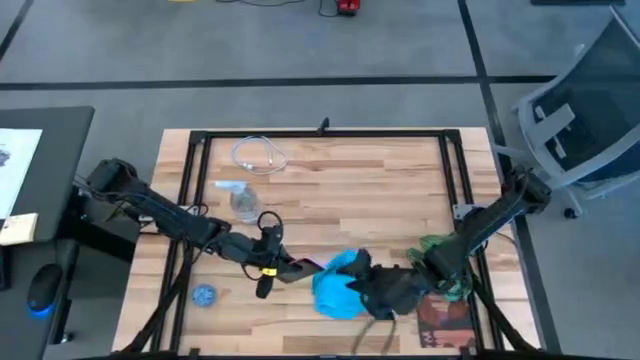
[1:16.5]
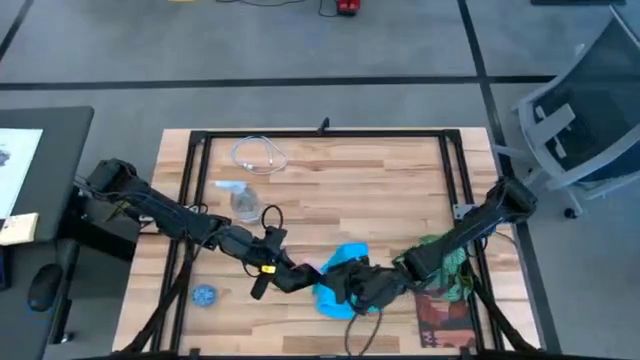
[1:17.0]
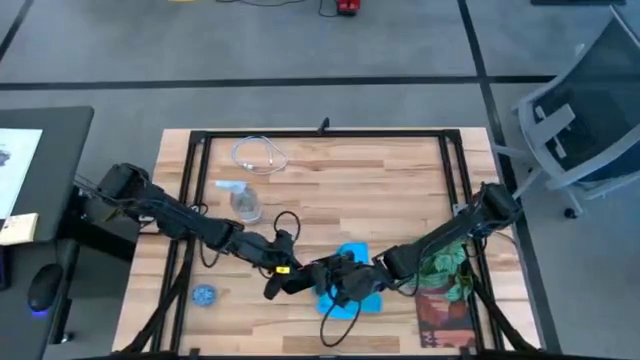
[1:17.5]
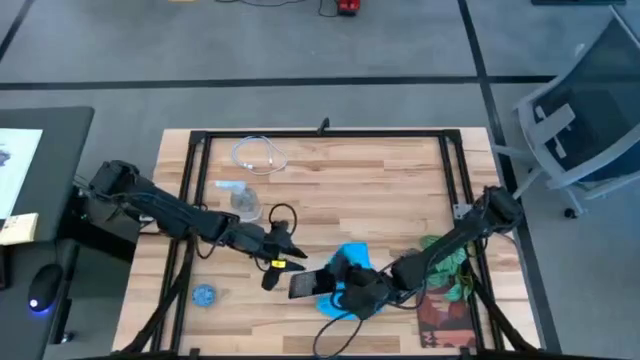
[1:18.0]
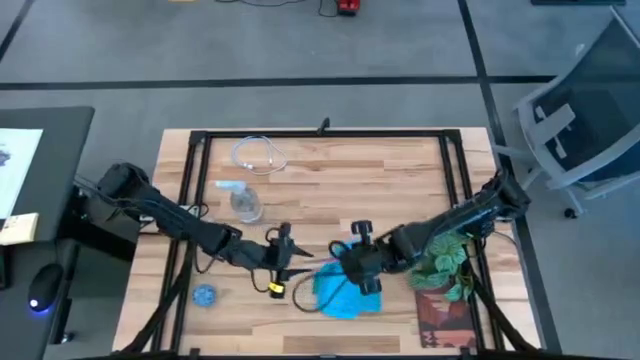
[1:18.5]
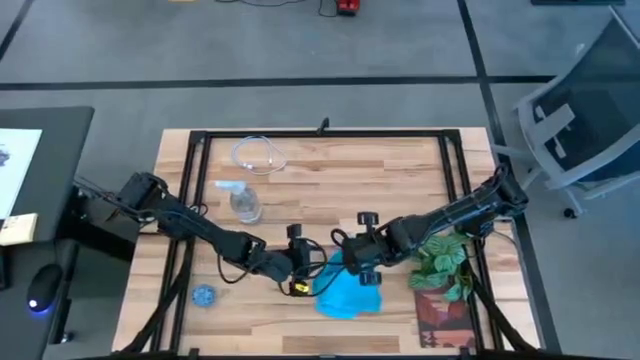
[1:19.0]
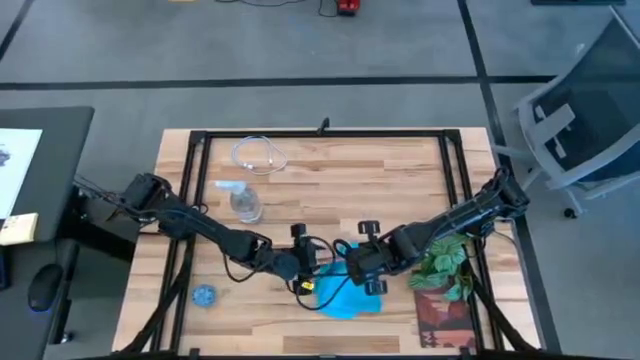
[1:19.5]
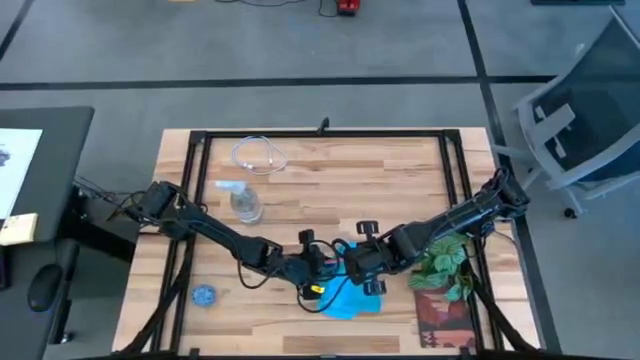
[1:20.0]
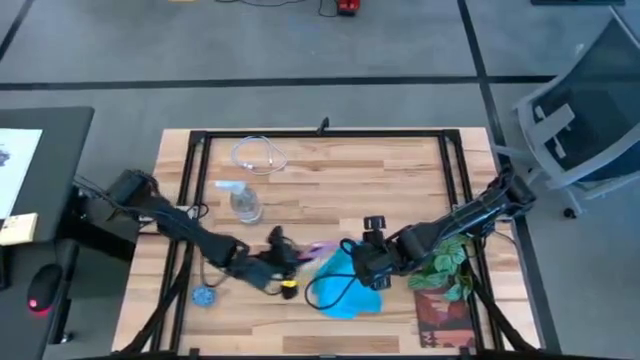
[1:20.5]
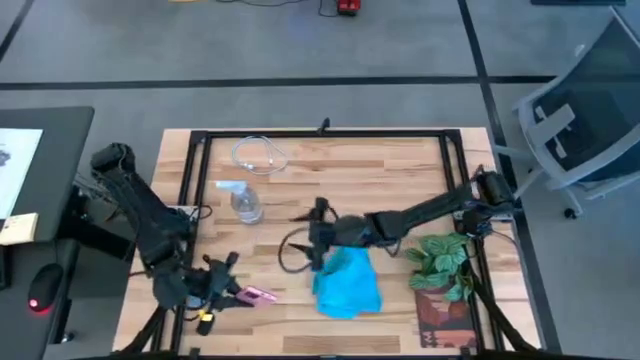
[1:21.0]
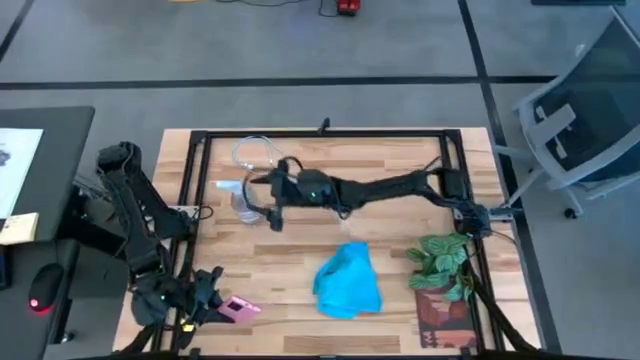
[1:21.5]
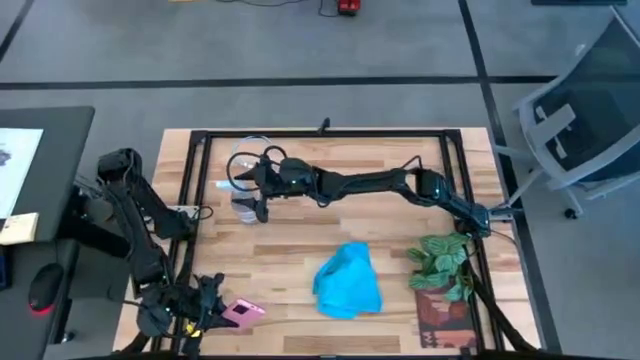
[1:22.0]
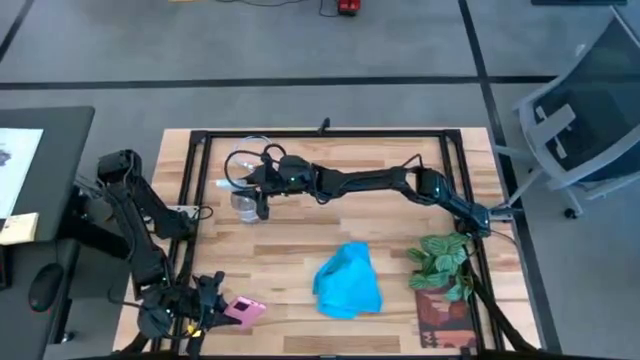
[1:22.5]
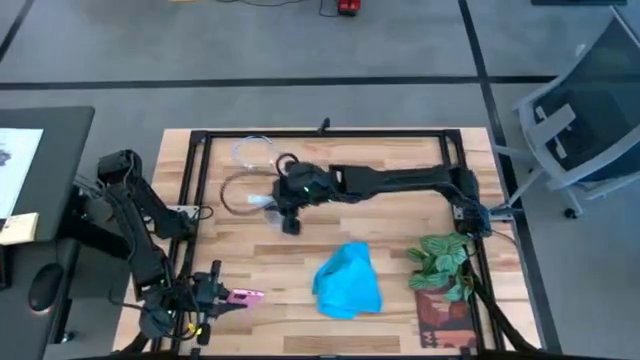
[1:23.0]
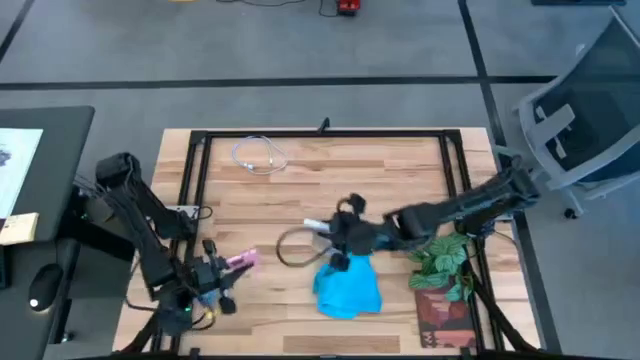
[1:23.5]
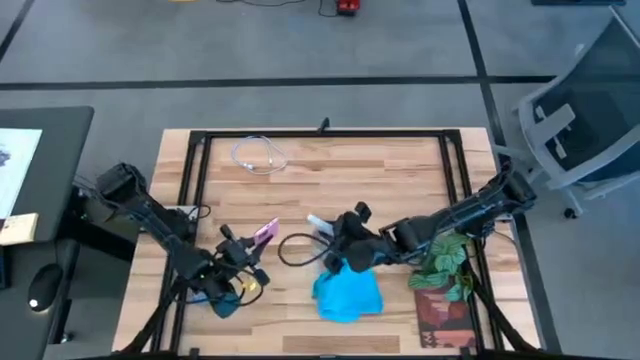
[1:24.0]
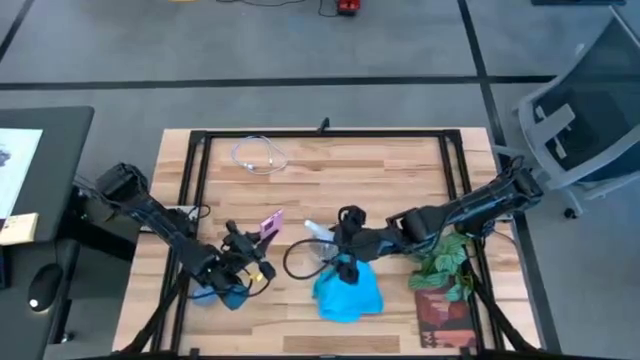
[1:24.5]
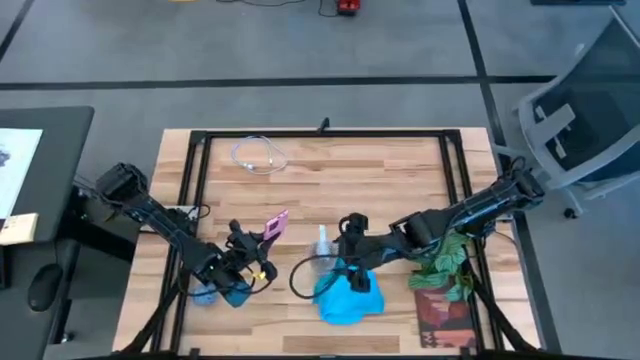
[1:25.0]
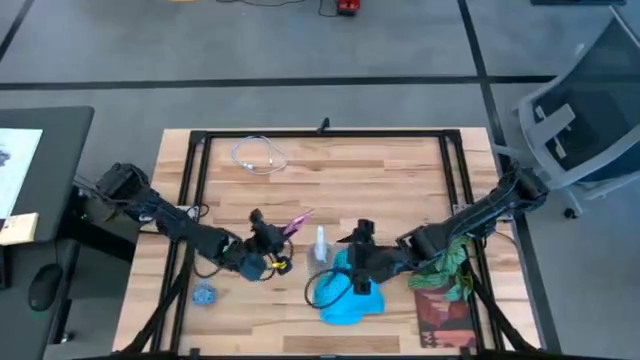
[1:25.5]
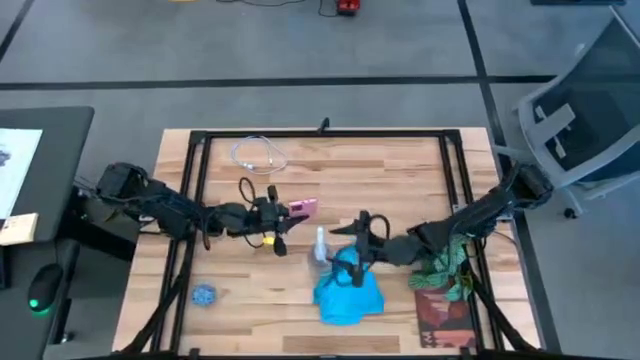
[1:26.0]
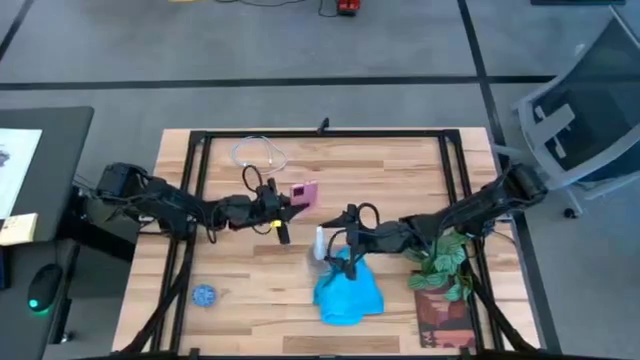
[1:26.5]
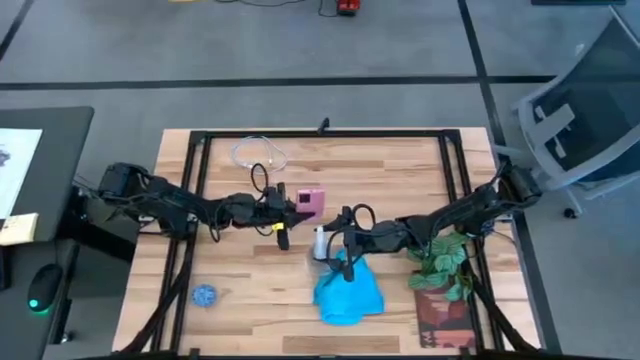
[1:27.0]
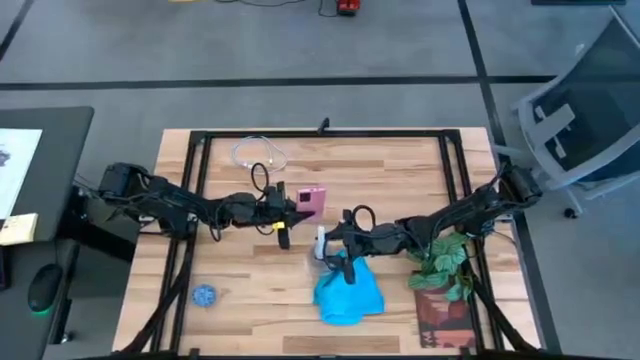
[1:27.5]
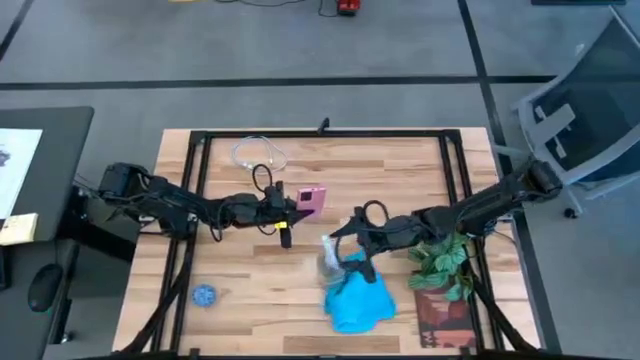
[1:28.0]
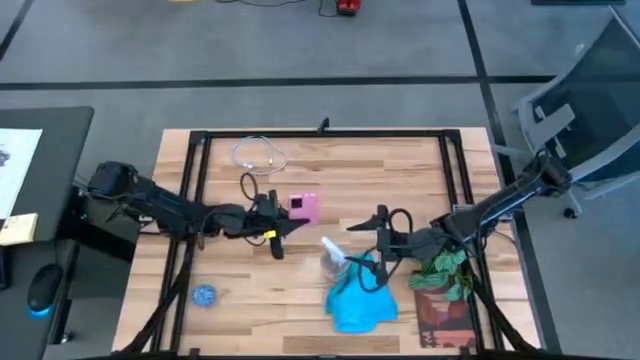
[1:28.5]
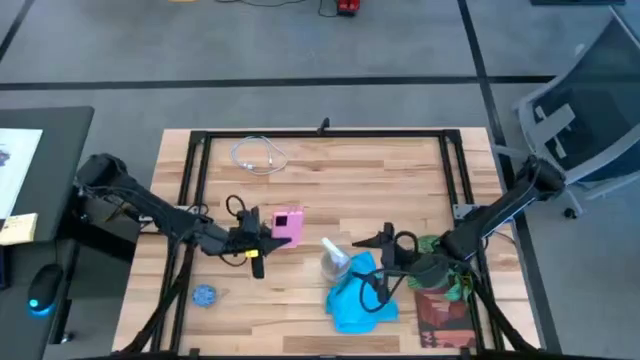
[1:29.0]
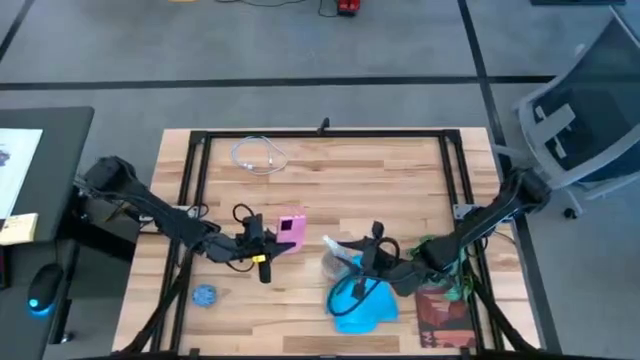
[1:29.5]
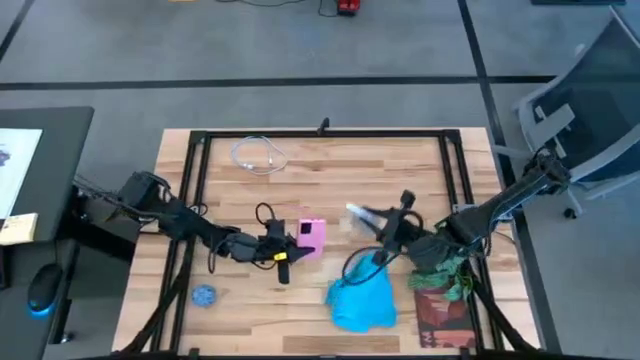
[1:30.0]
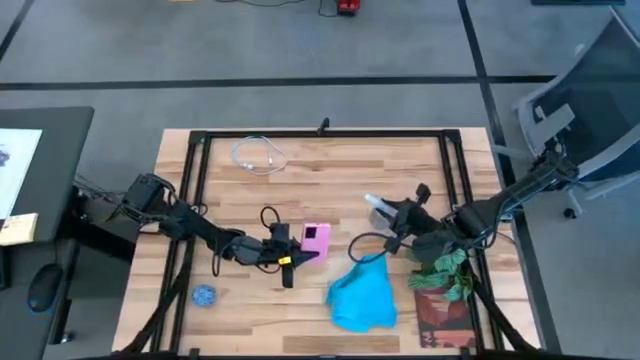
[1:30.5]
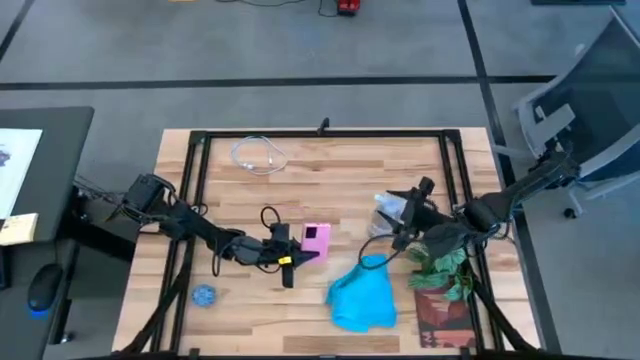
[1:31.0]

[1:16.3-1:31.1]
Task: Apply microfiber cloth
Spray the back of the cellphone using the spray bottle

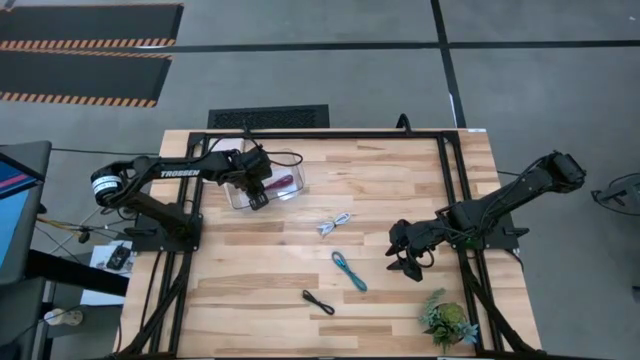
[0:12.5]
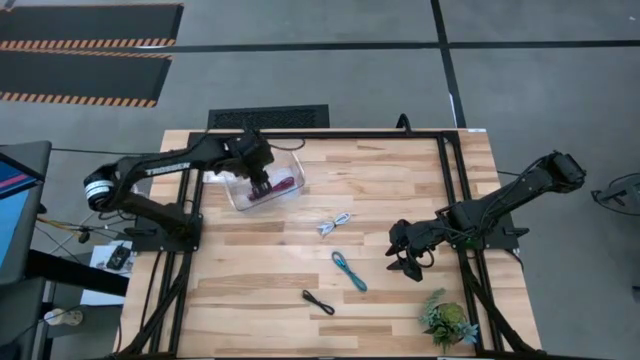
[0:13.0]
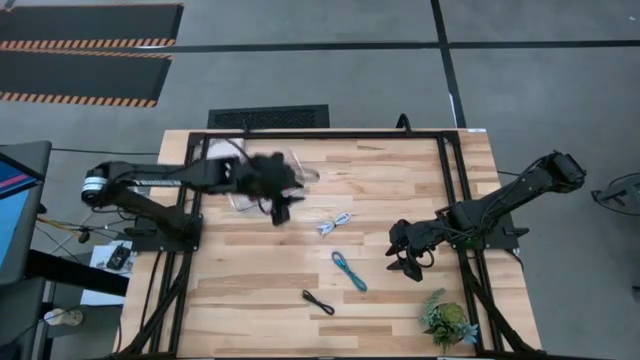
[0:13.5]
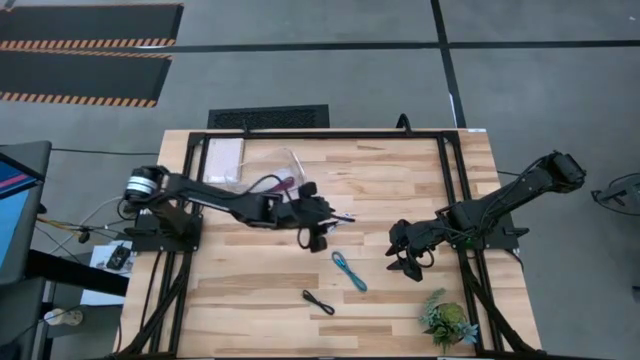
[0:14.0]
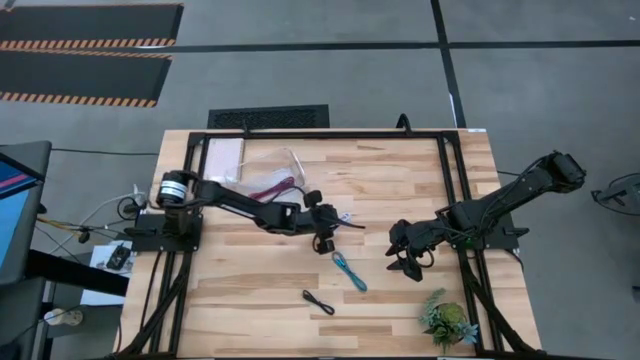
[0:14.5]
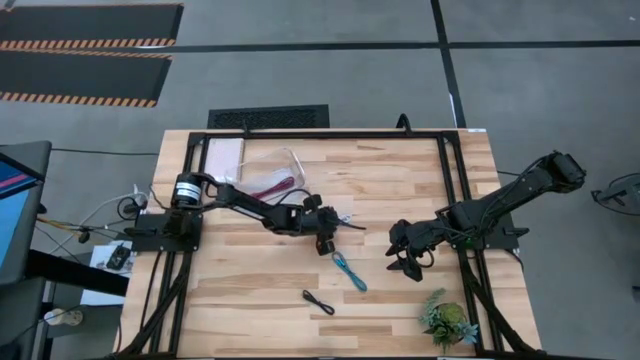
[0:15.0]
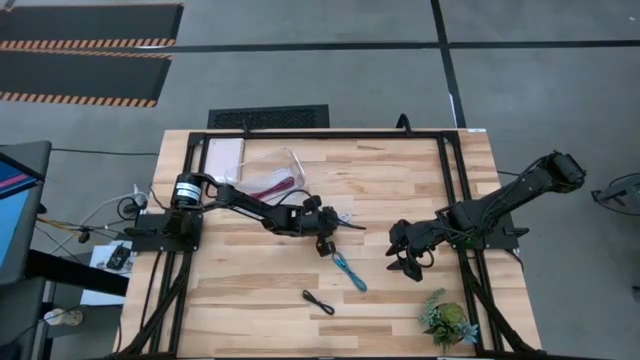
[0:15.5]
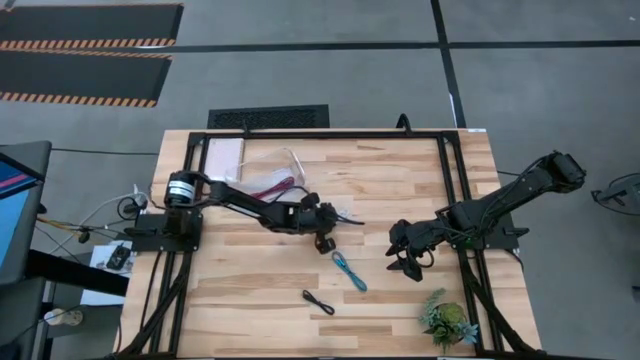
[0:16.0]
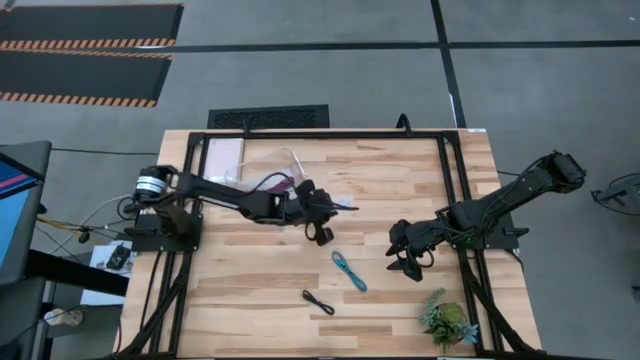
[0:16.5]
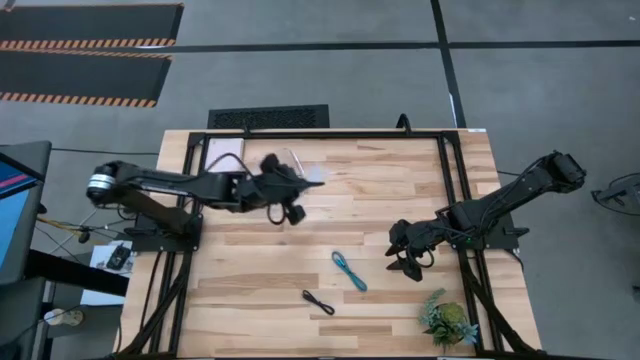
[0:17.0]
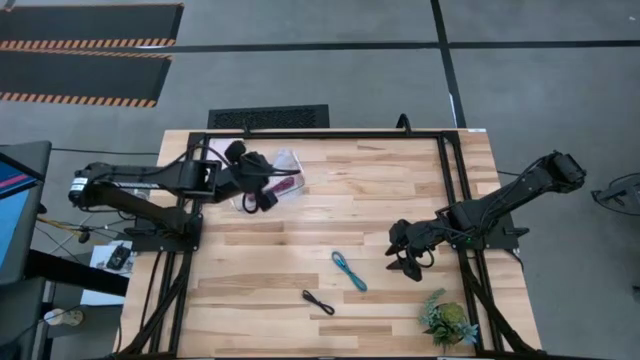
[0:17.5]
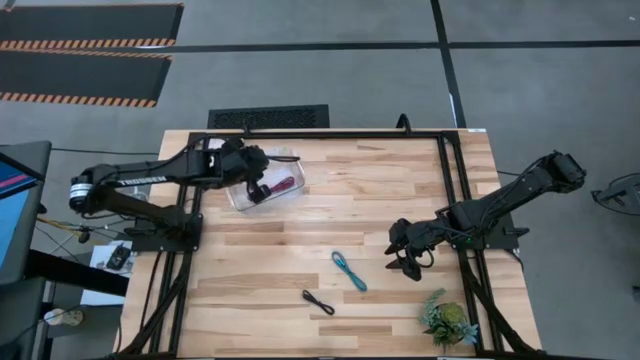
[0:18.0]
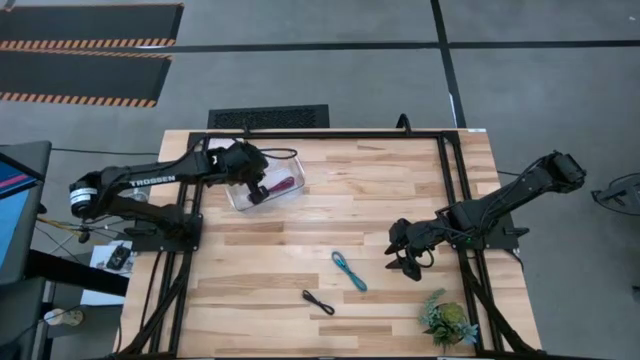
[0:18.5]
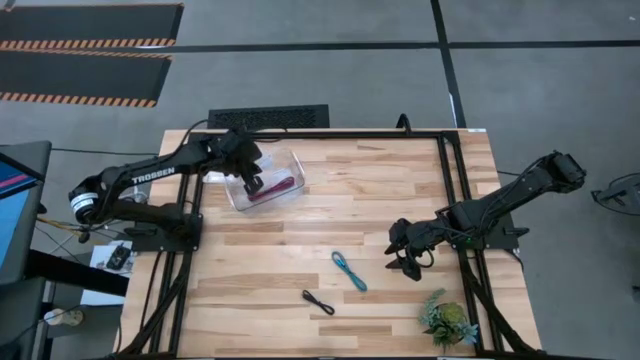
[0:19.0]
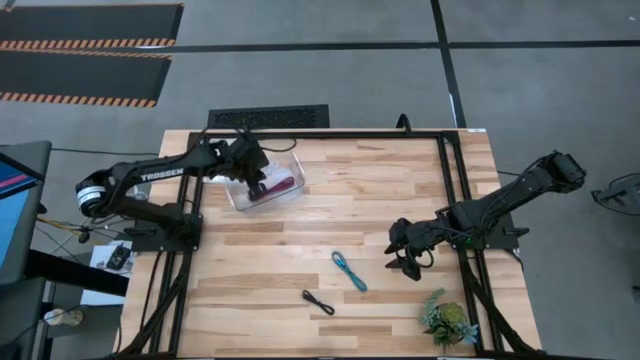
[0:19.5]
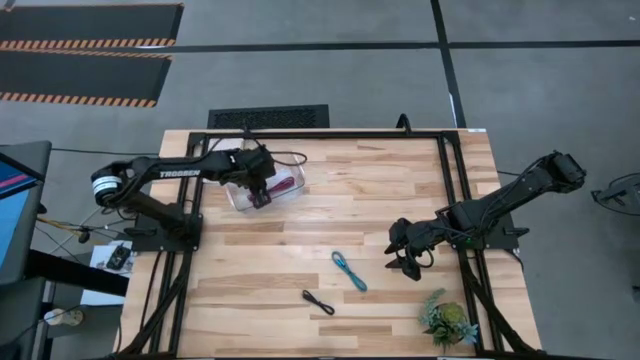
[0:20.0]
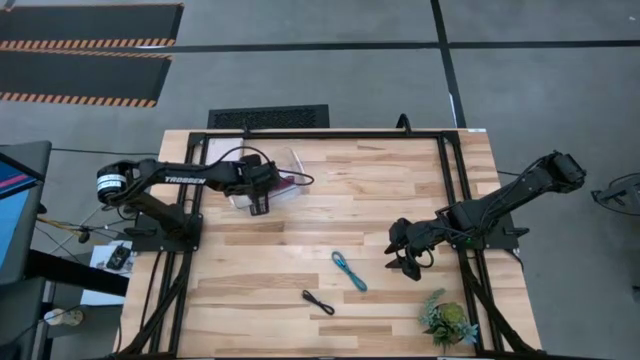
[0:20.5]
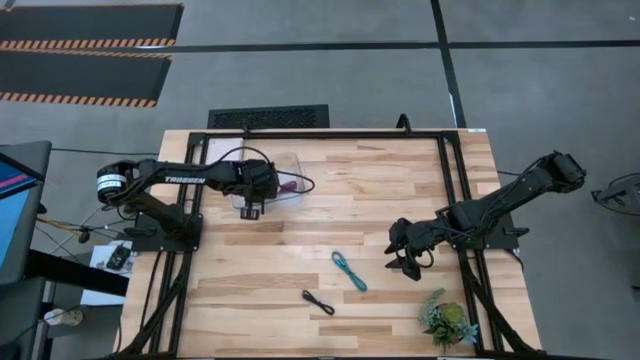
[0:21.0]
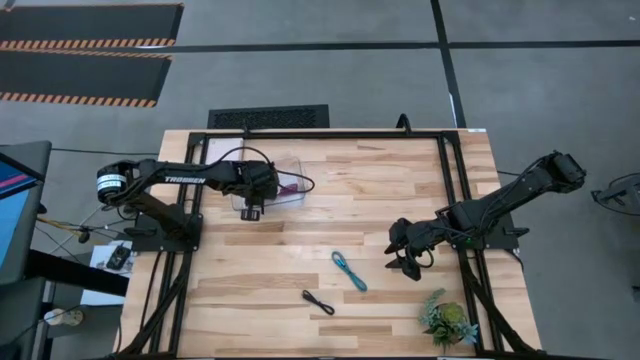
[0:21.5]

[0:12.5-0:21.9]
Task: Pick and place USB-C Cables
Put the white usb cables into the bin
